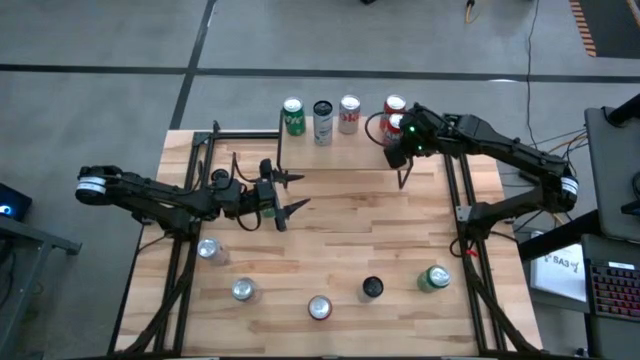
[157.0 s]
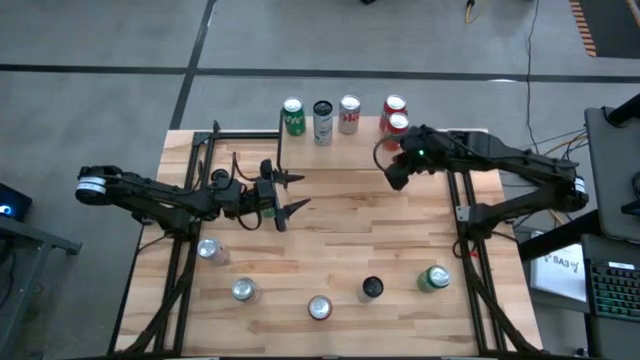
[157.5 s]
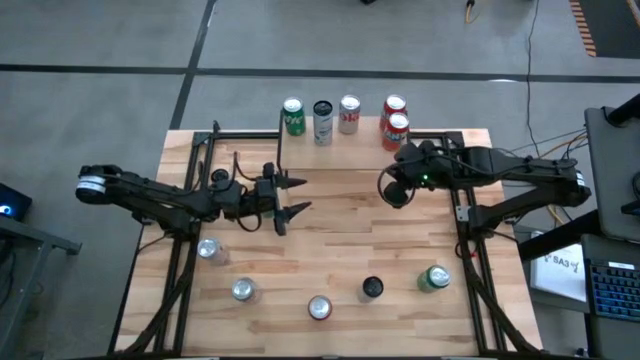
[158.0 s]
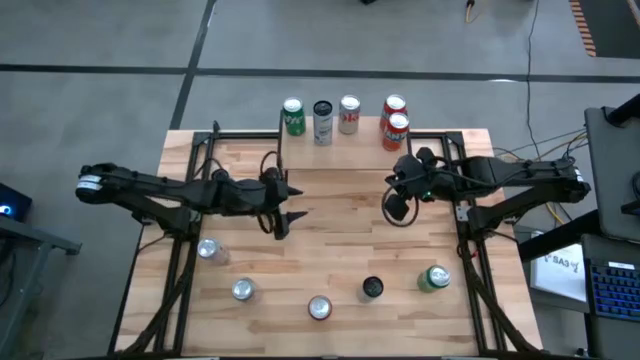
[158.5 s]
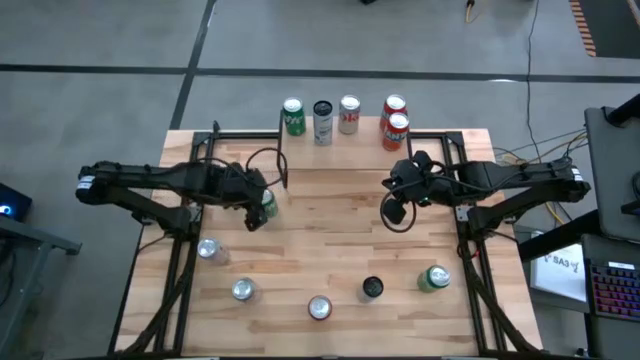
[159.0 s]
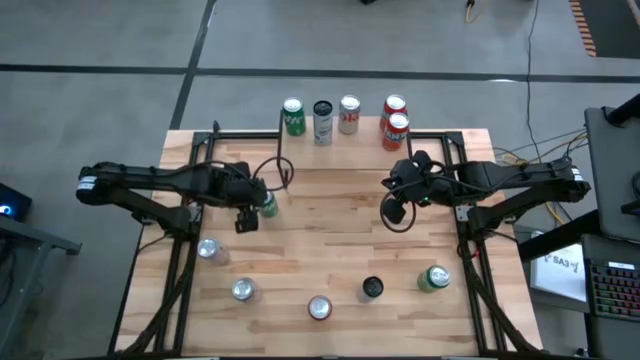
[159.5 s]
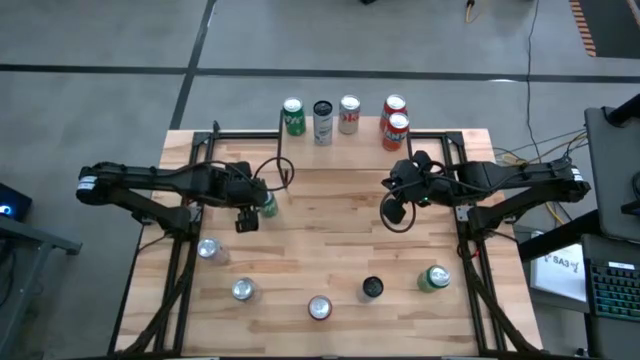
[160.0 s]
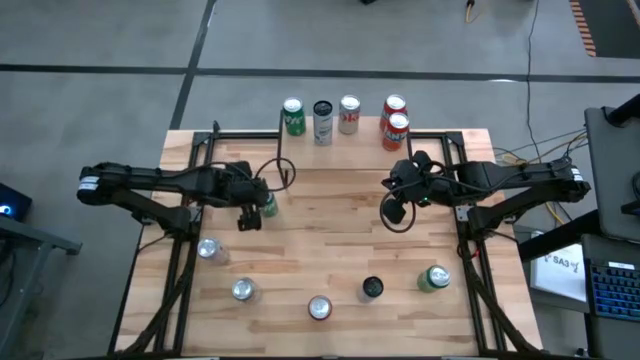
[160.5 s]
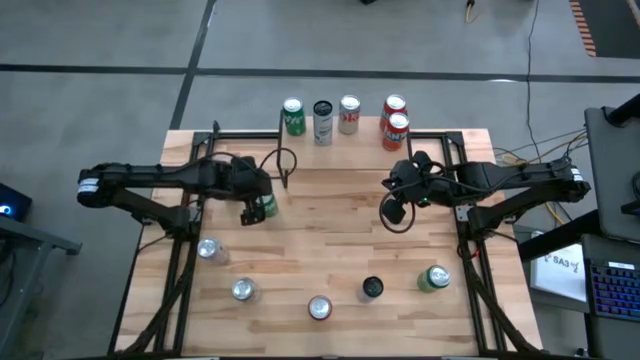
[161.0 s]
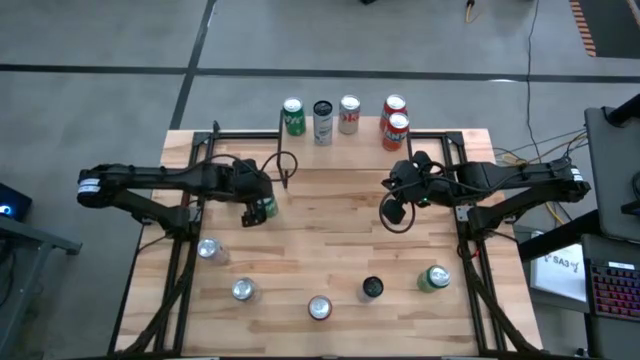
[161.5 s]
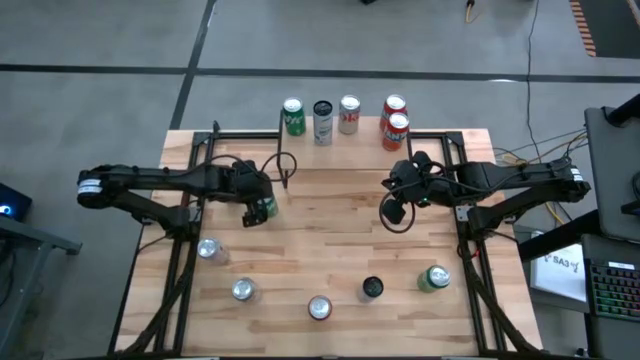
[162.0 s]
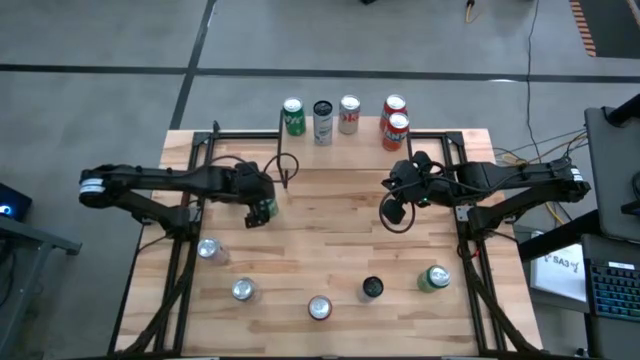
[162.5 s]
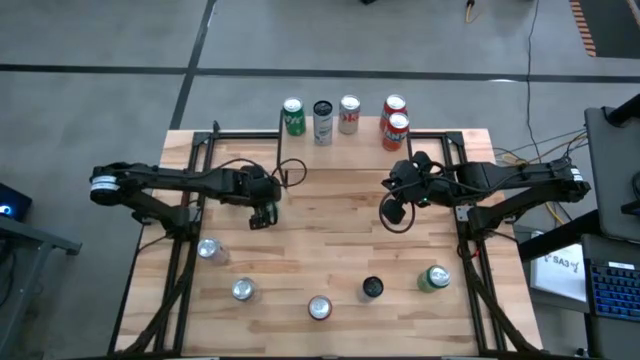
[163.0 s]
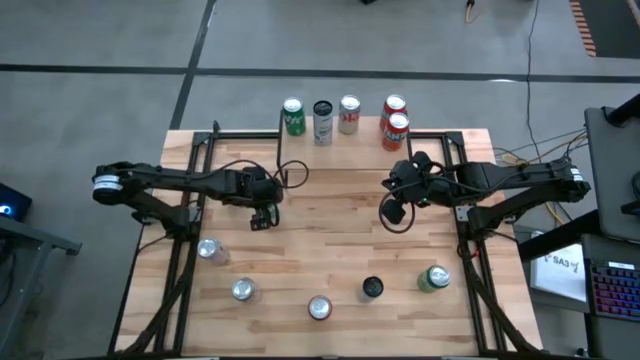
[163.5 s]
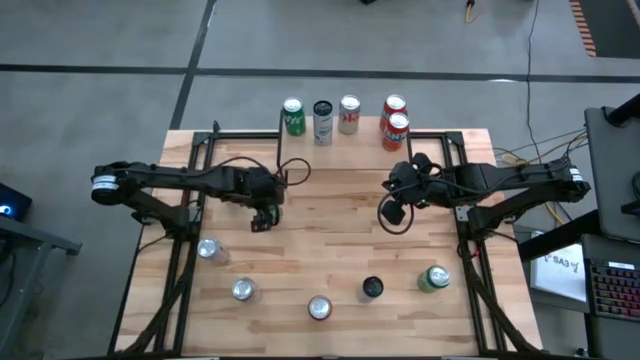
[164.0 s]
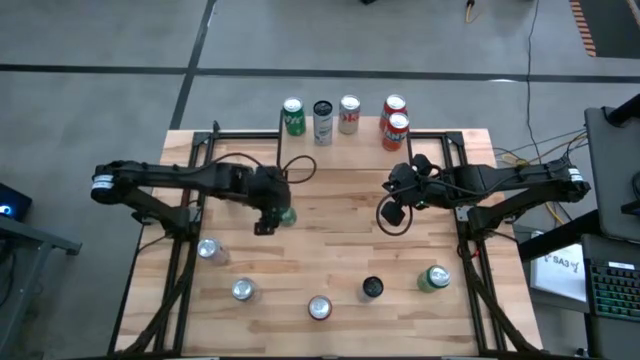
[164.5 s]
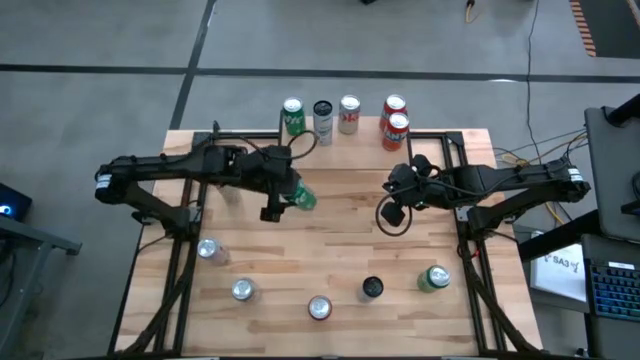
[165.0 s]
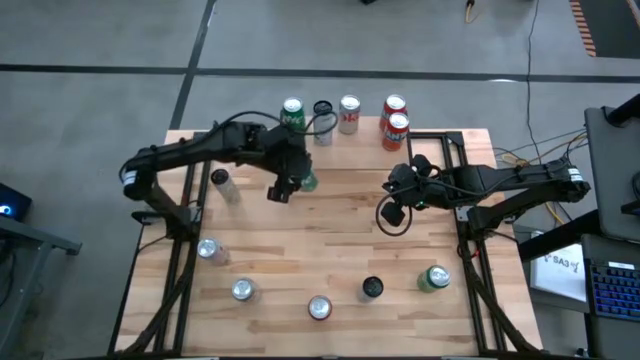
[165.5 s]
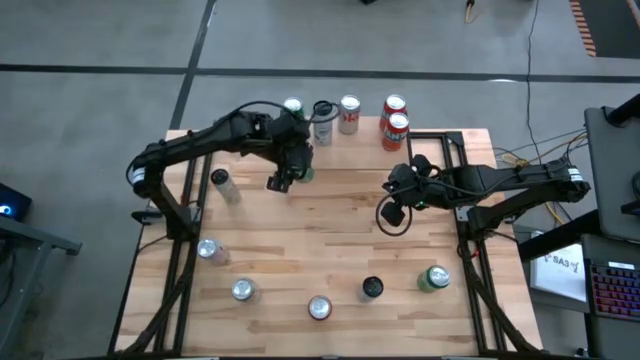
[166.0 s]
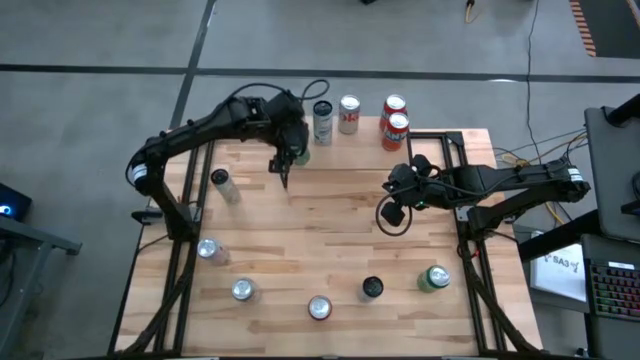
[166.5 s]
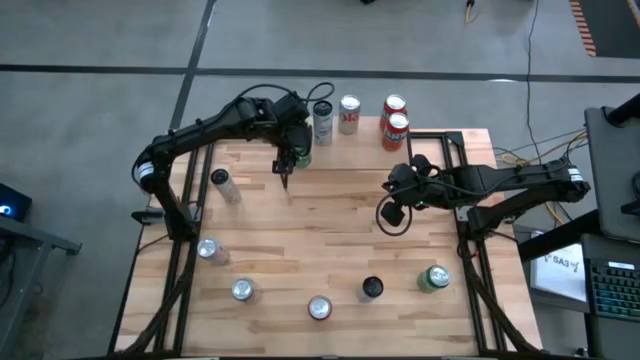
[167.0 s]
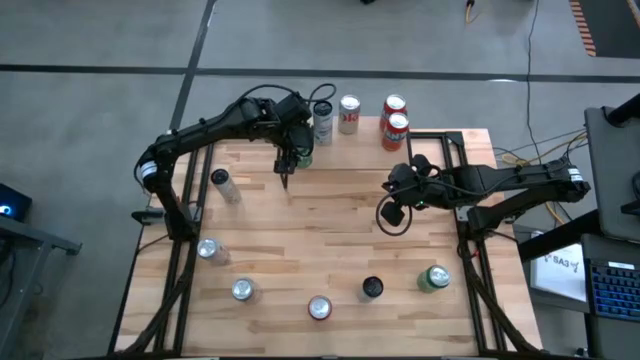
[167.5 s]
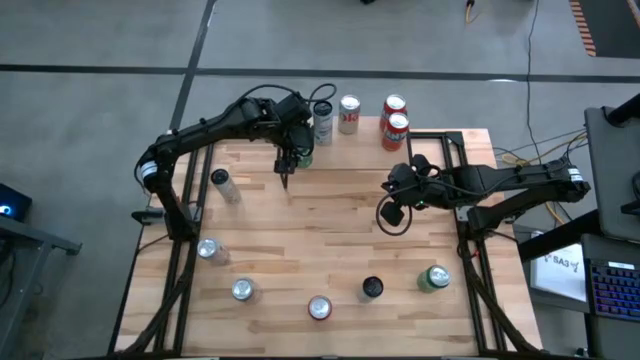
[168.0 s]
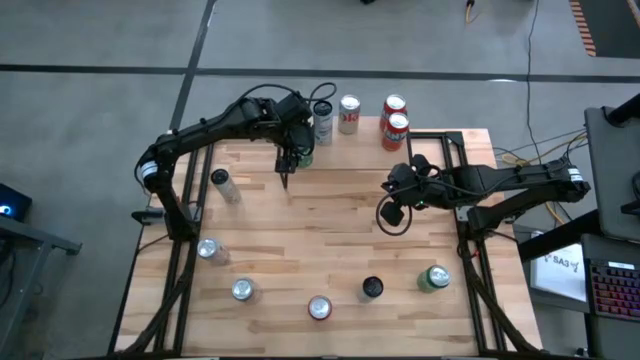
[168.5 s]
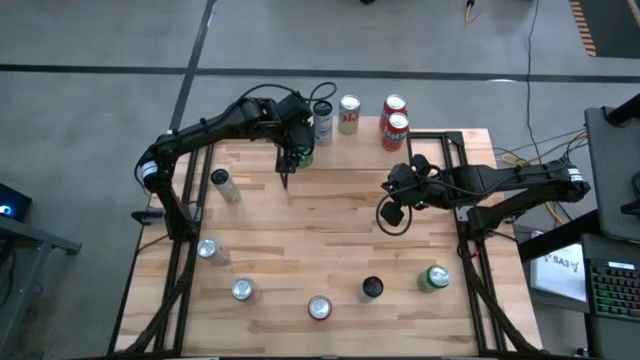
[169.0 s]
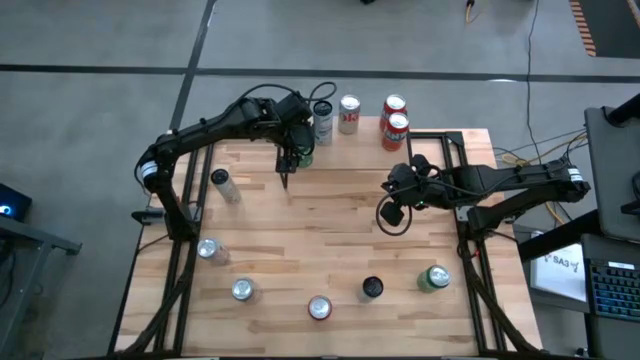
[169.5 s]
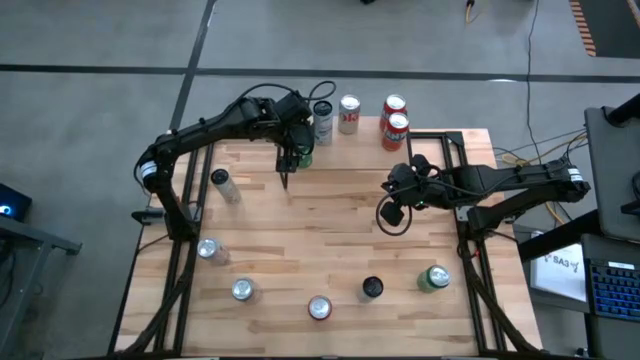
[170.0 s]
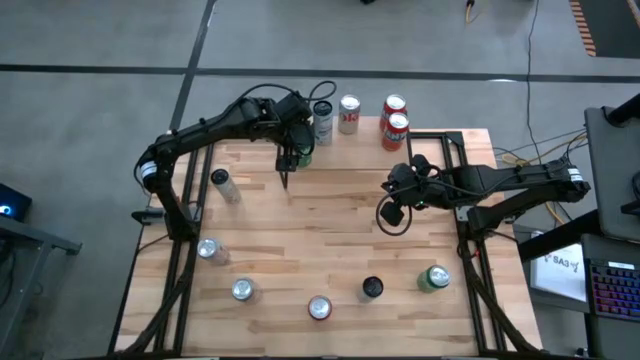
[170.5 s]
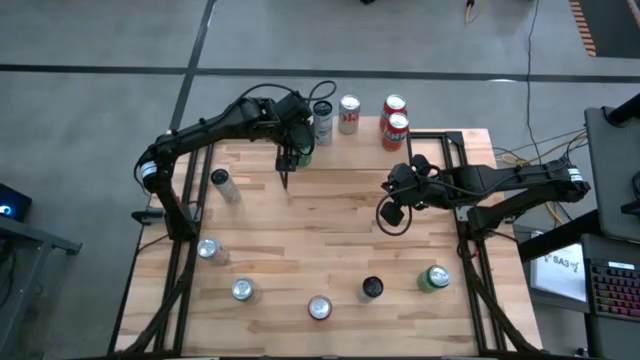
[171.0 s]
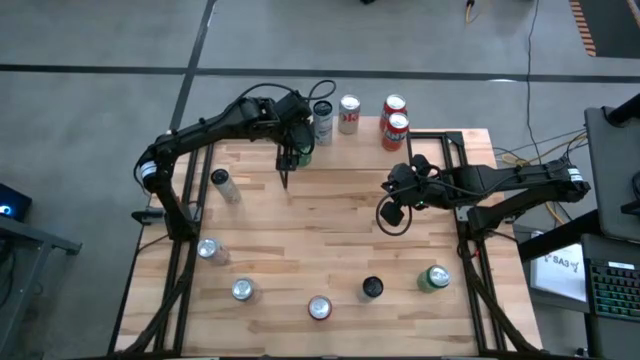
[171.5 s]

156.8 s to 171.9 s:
Task: Place canned beverage on shelf
Put the top green soda can on the shelf aligned with the other green soda can
